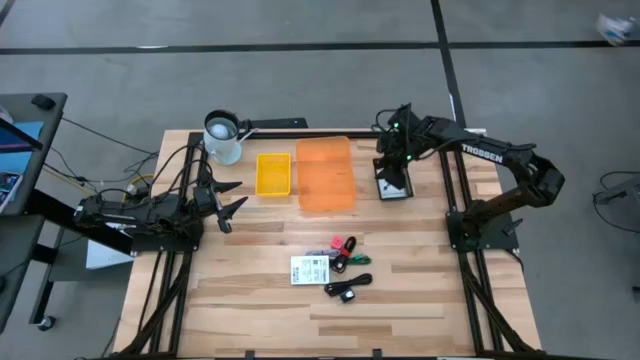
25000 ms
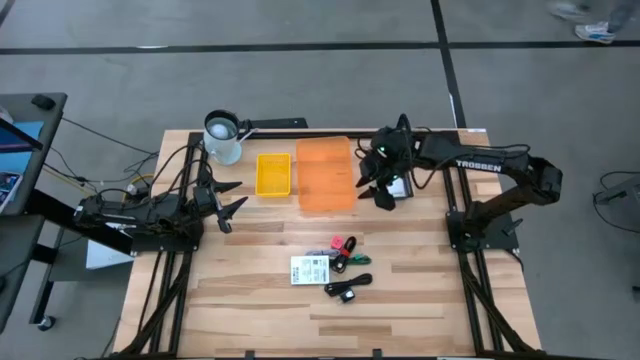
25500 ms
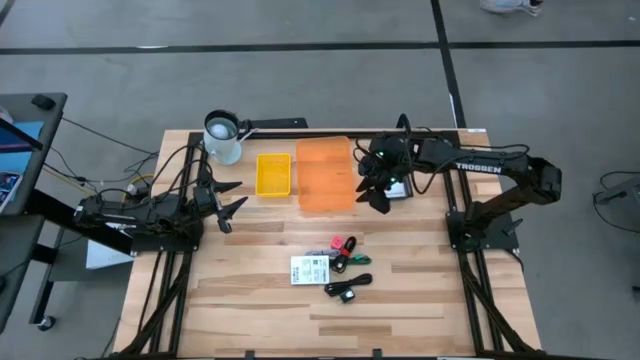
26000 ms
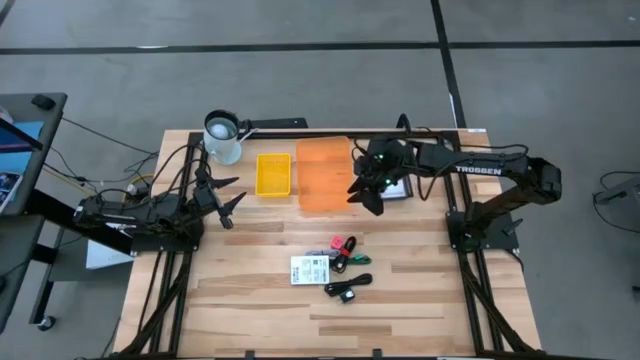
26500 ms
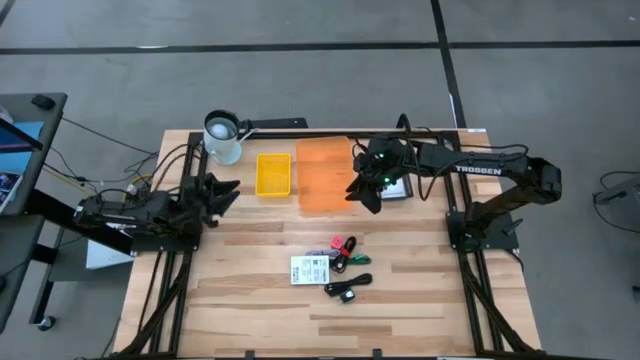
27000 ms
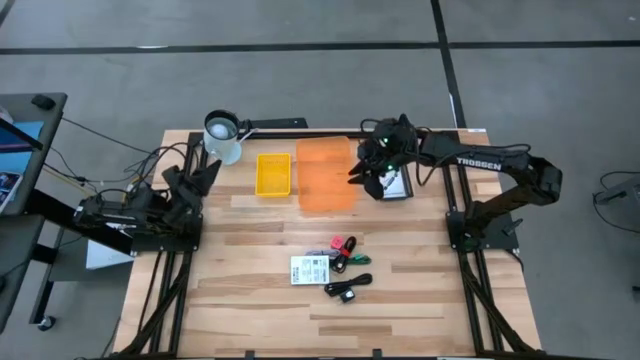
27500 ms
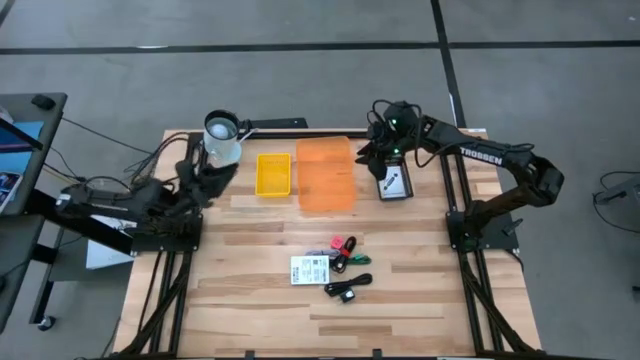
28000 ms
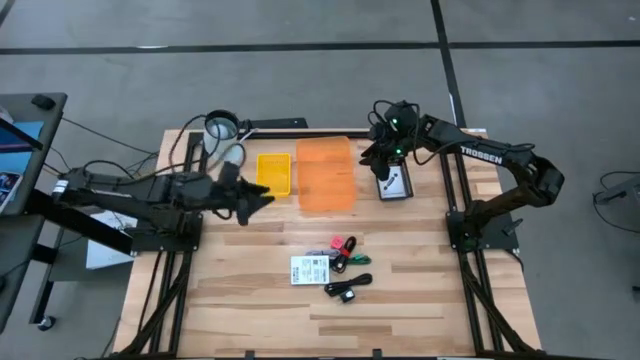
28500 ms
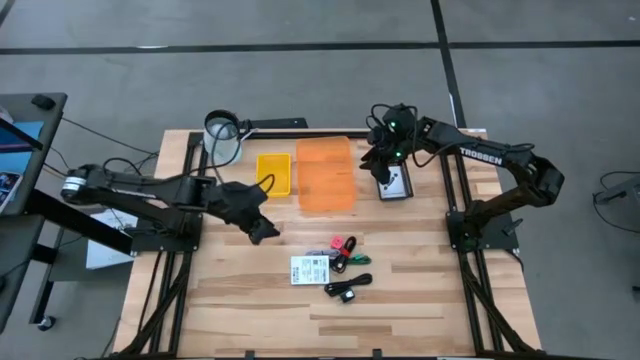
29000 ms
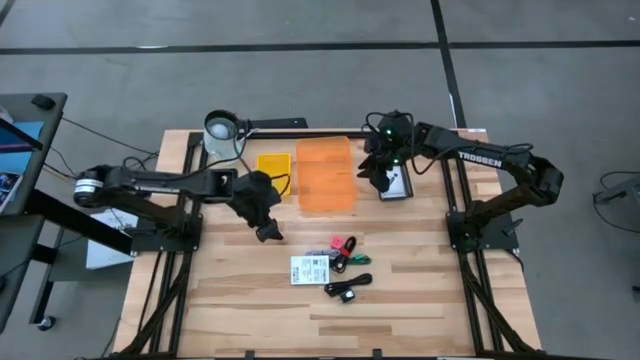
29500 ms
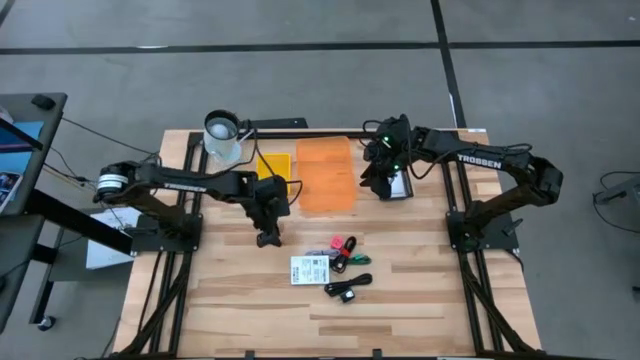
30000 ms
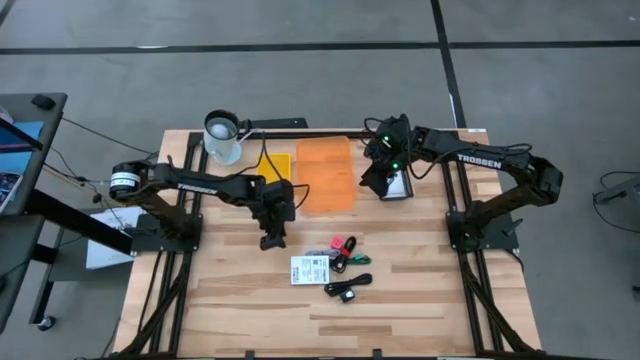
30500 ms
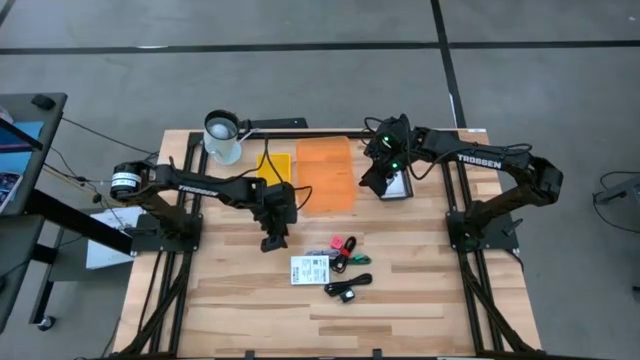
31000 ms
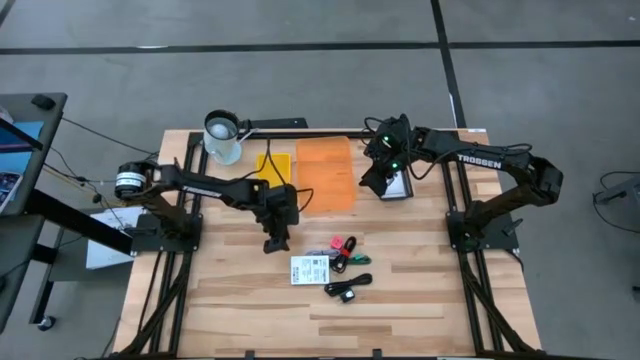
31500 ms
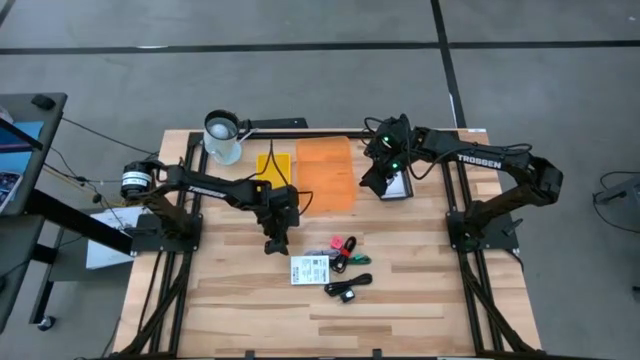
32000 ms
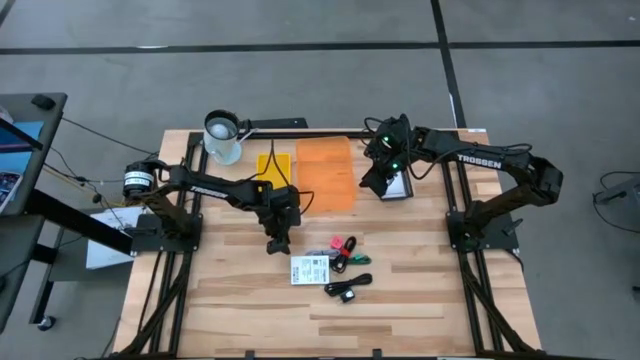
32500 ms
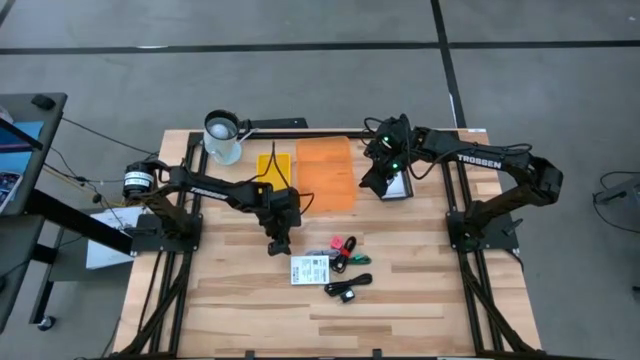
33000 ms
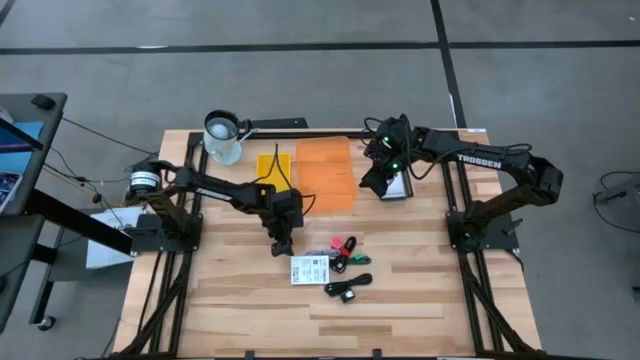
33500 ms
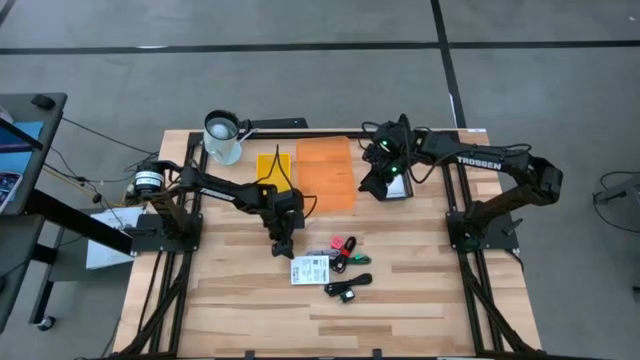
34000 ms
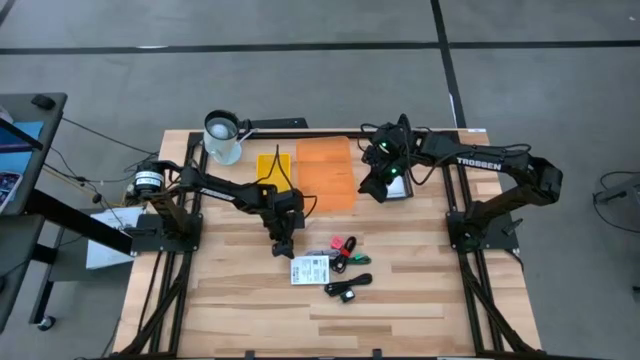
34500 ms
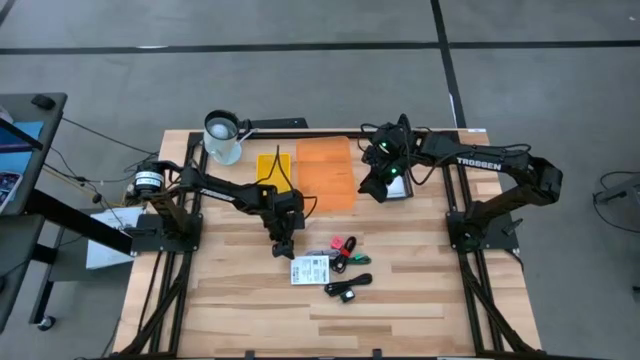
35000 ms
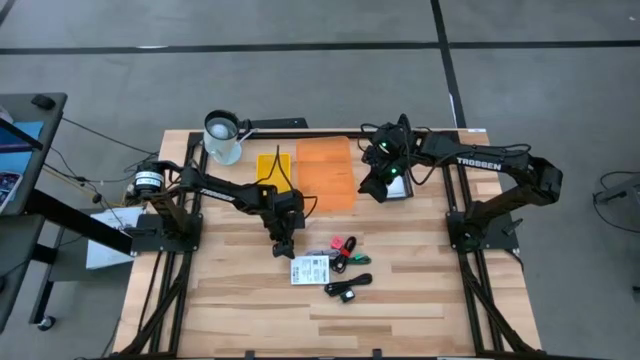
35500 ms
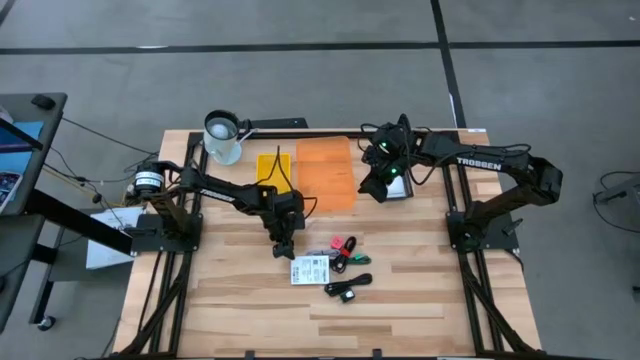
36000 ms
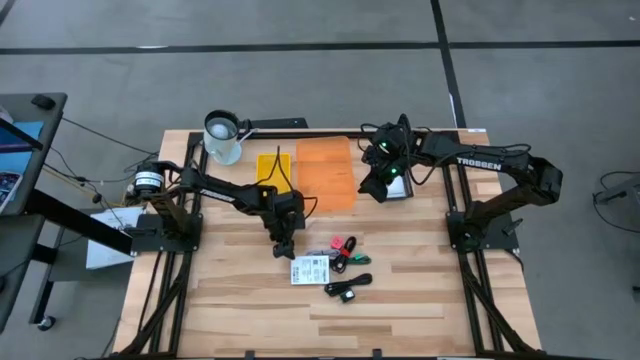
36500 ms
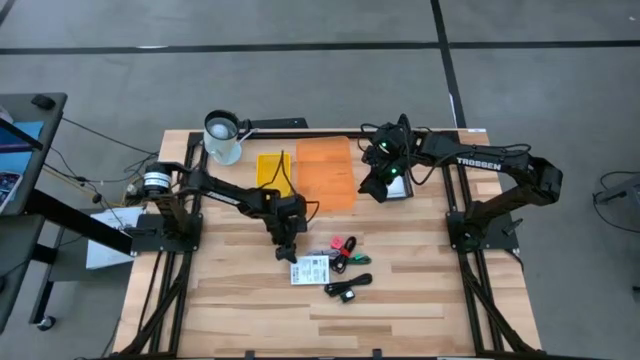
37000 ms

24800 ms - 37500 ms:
Task: Pick and place items into bin
Put the white card reader box into the black bin

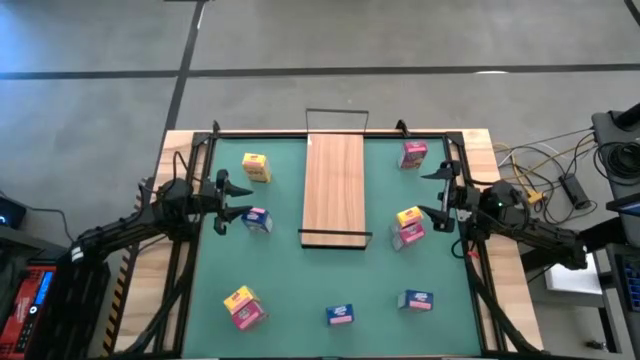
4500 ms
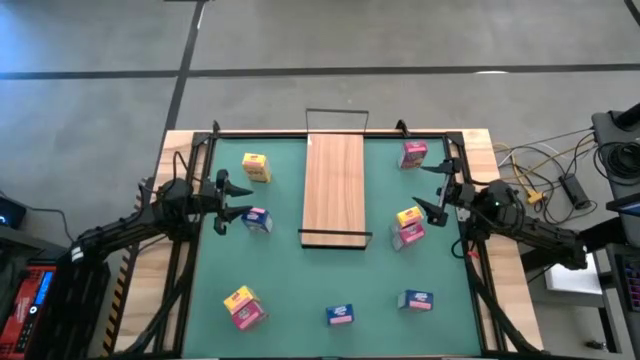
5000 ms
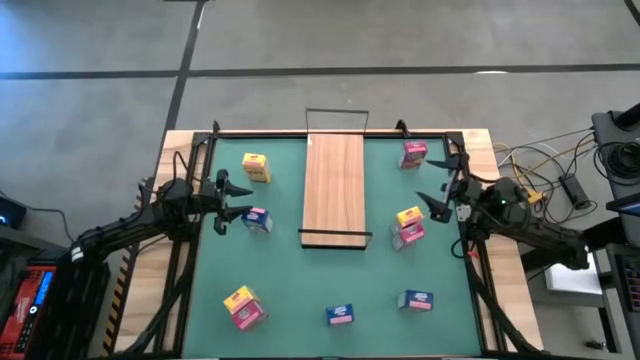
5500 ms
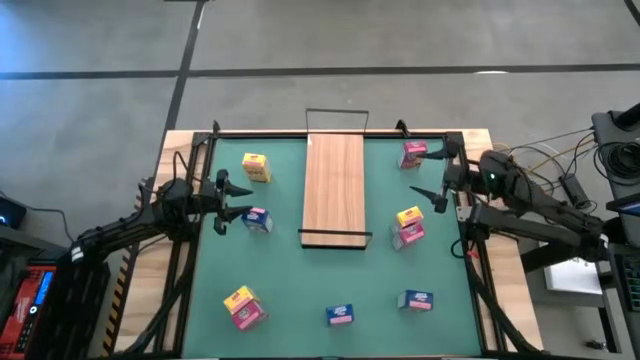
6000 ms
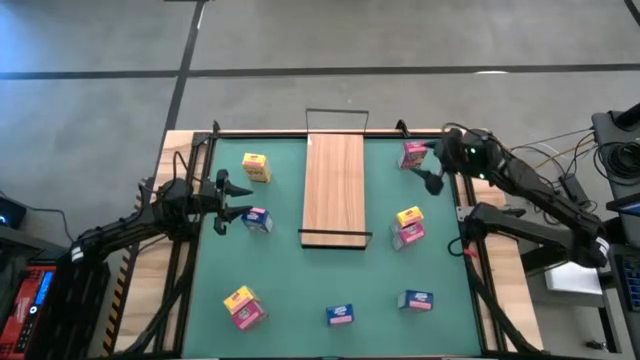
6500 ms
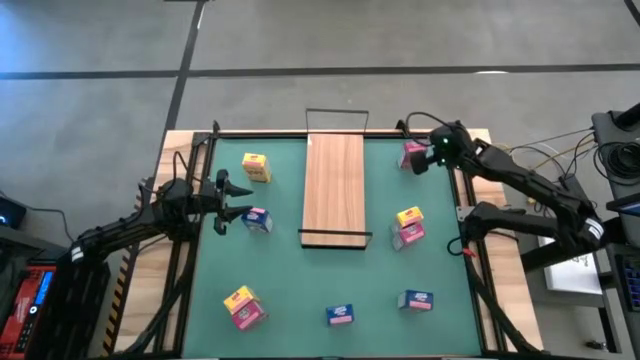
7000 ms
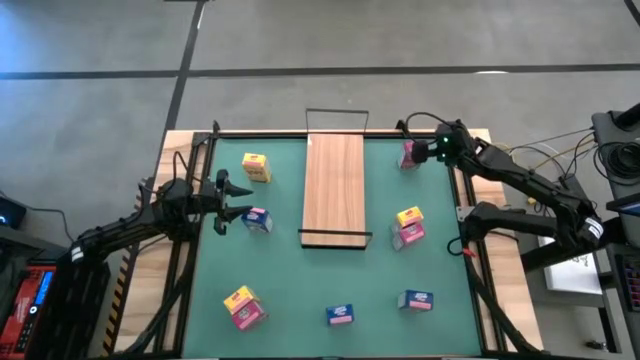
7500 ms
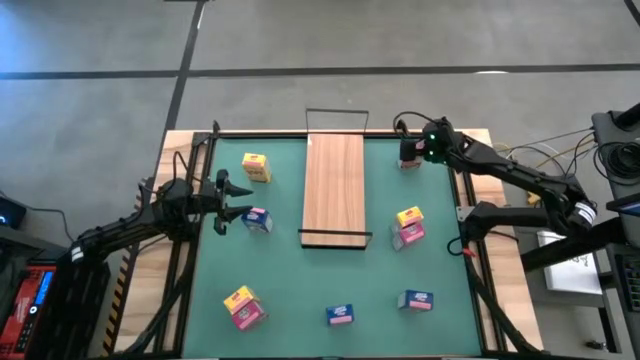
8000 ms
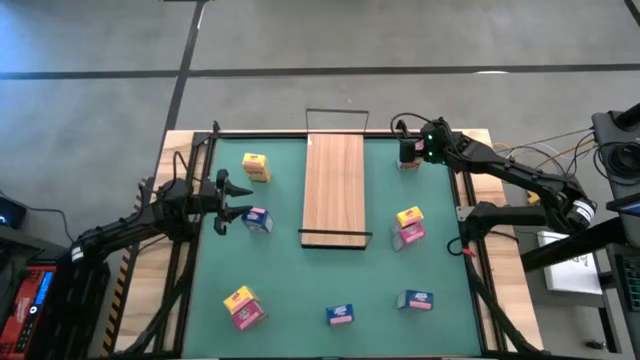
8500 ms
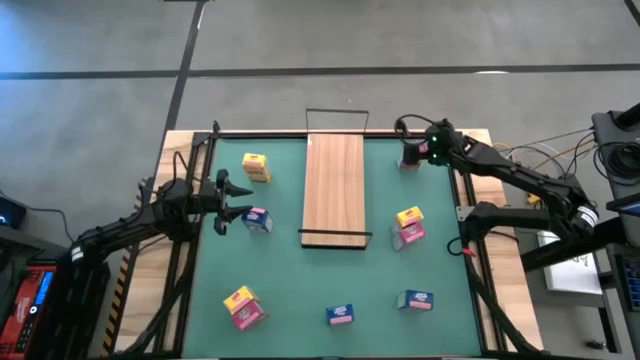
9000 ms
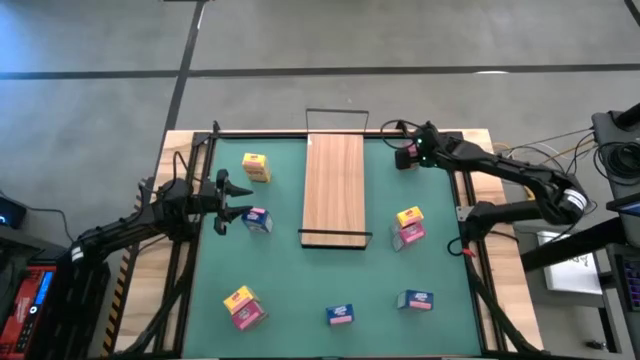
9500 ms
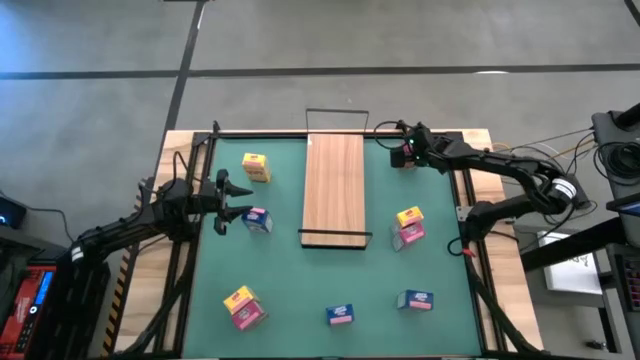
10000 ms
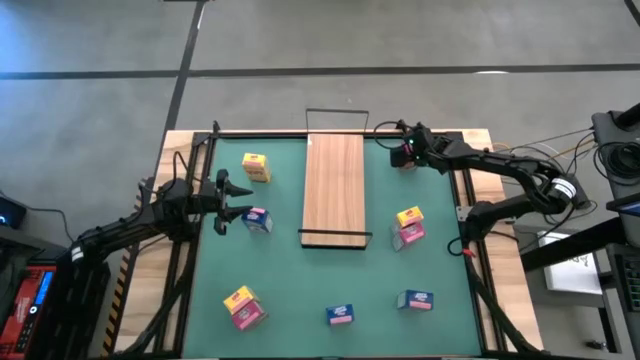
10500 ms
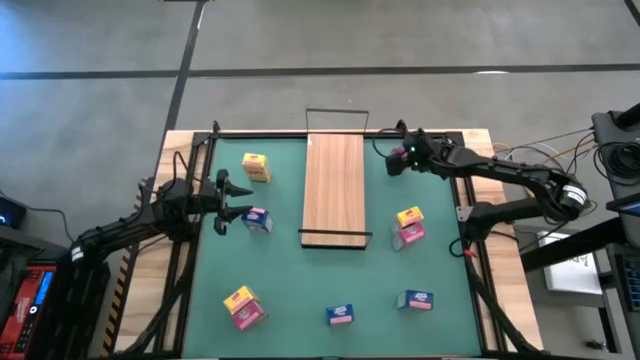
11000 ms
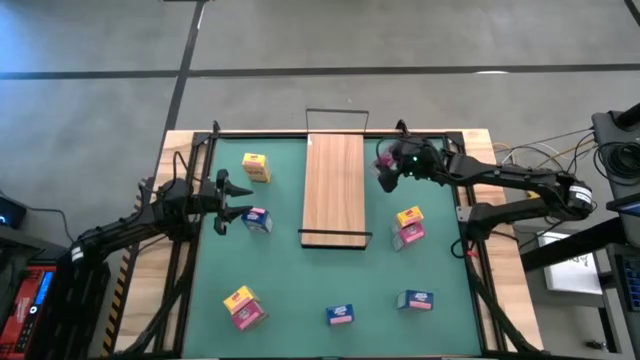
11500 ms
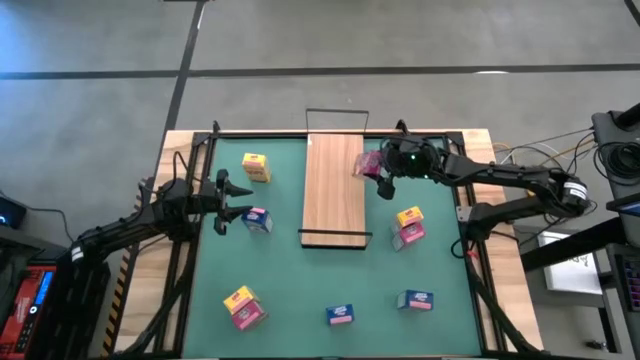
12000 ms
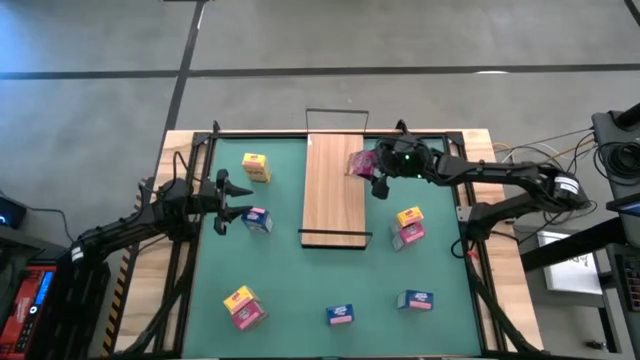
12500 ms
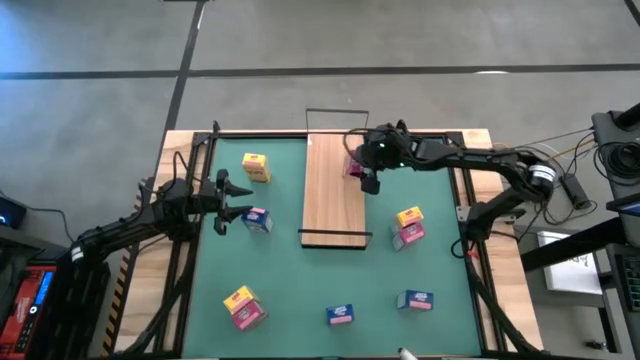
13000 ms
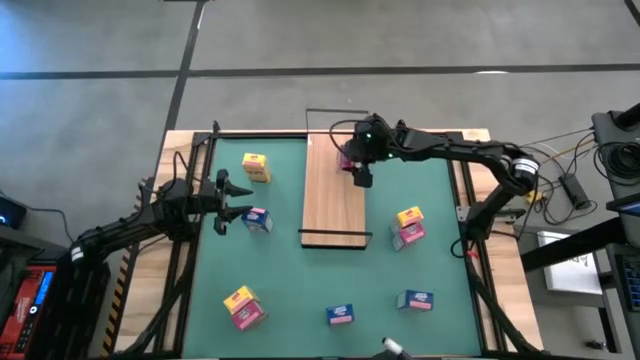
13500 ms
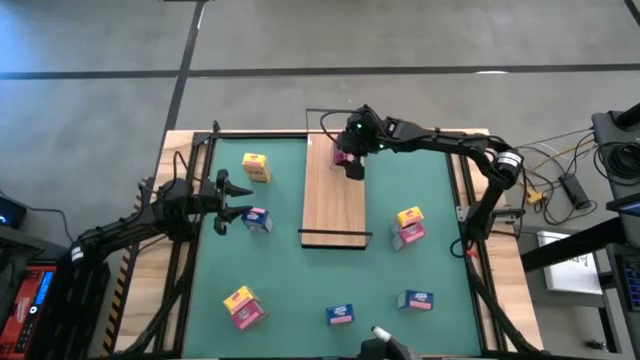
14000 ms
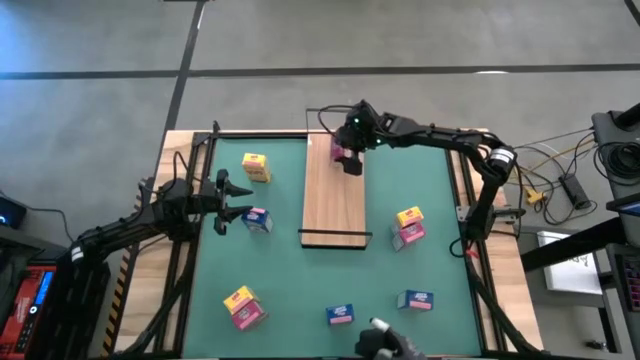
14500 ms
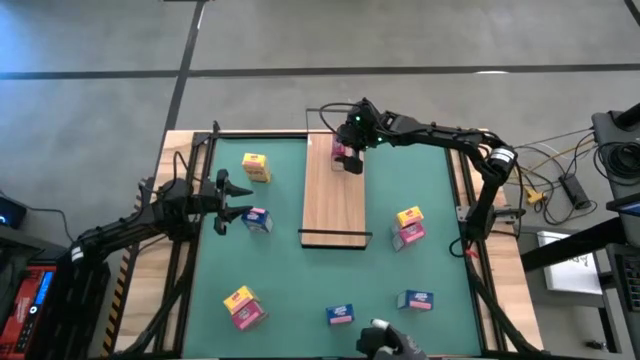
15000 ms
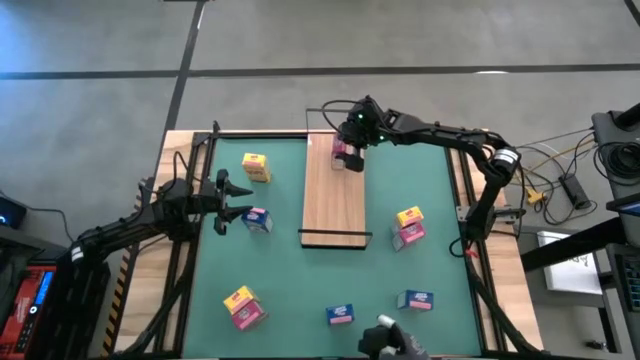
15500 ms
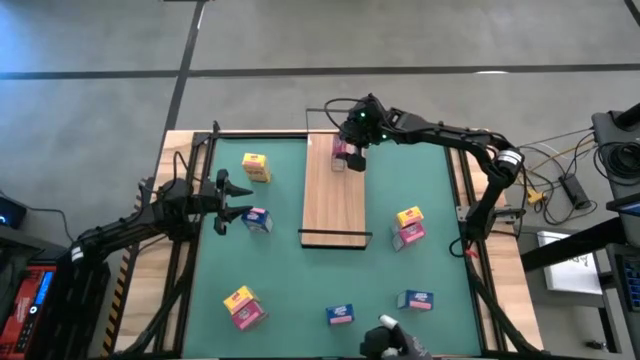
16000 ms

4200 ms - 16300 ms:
Task: Stack cereal on shelf
Put the top right pink cereal box on the shelf
